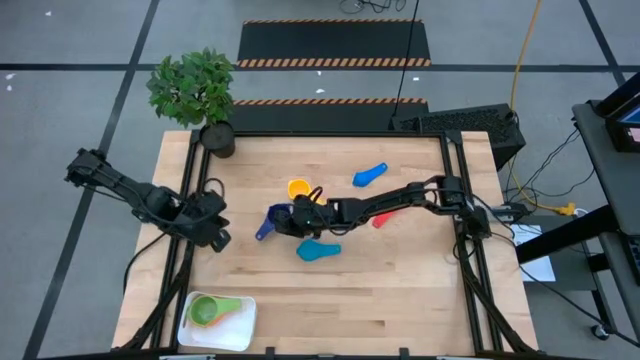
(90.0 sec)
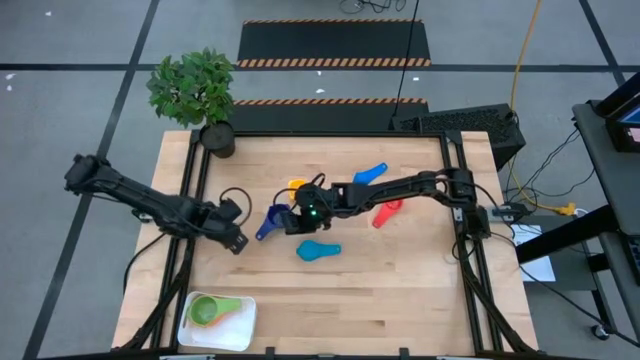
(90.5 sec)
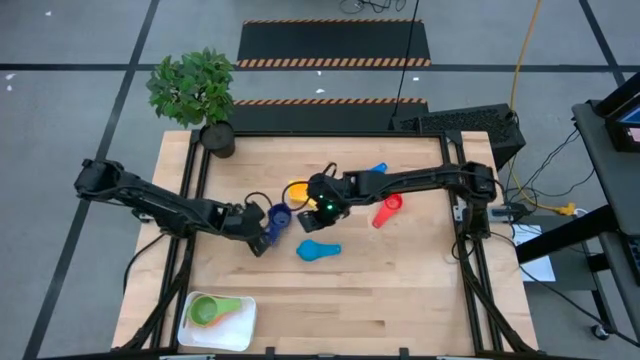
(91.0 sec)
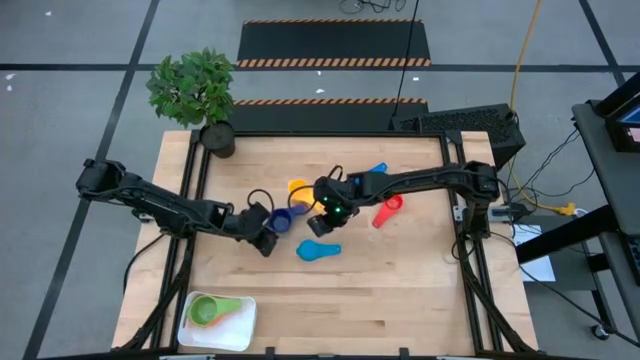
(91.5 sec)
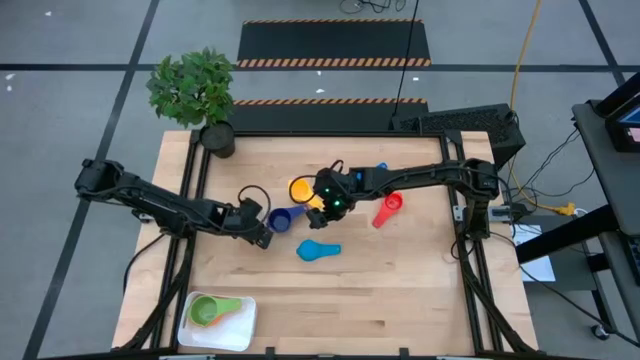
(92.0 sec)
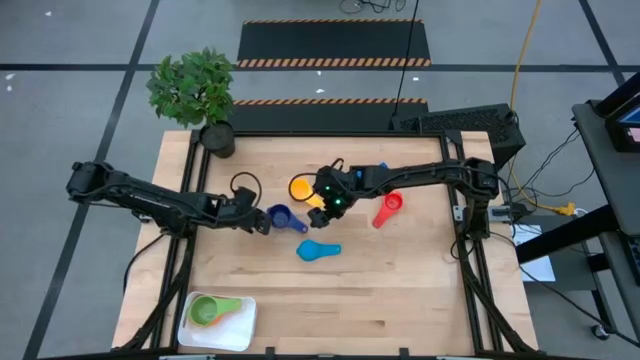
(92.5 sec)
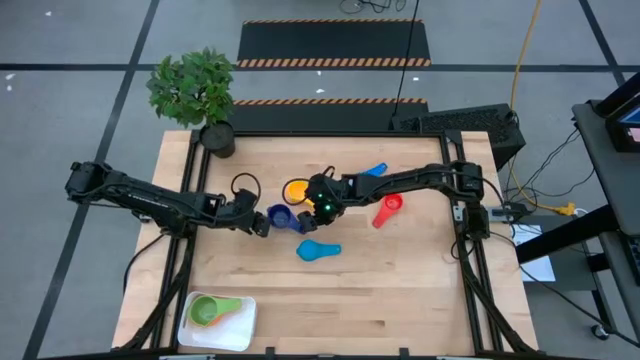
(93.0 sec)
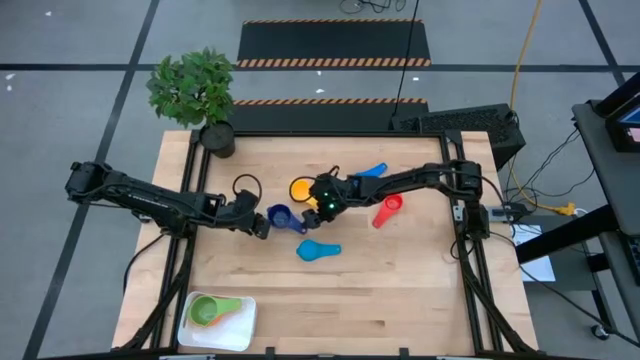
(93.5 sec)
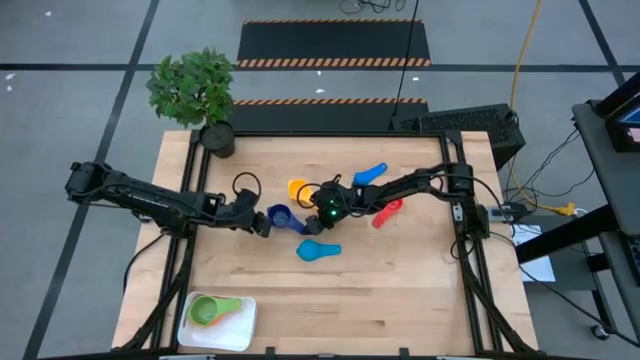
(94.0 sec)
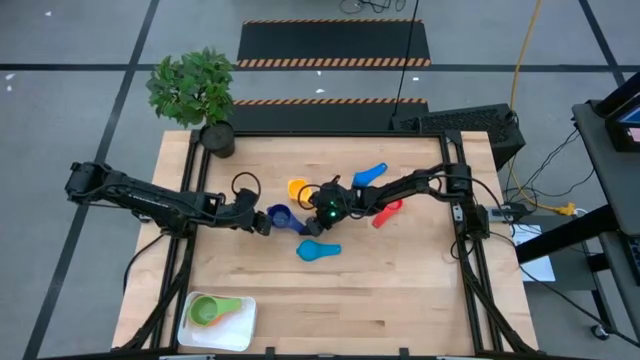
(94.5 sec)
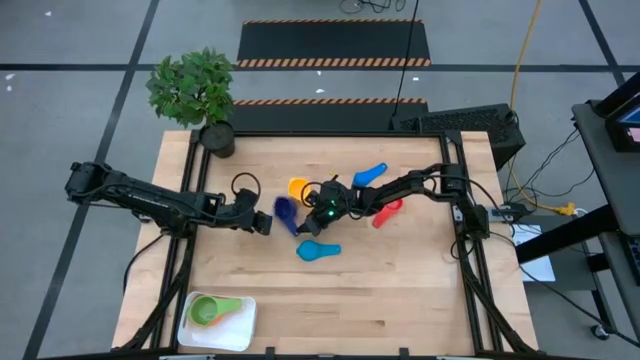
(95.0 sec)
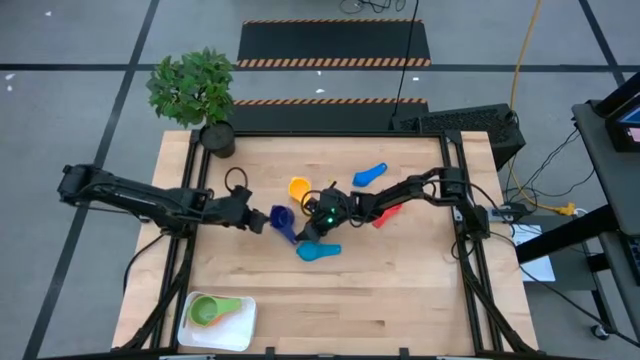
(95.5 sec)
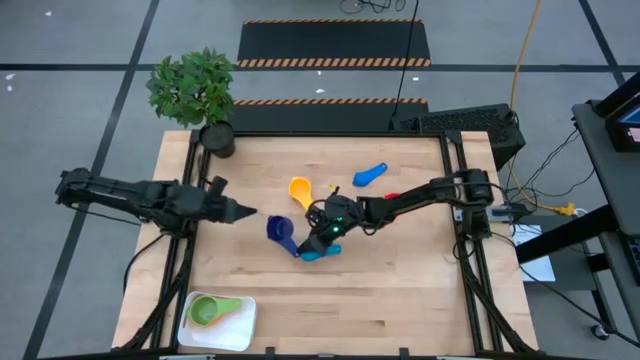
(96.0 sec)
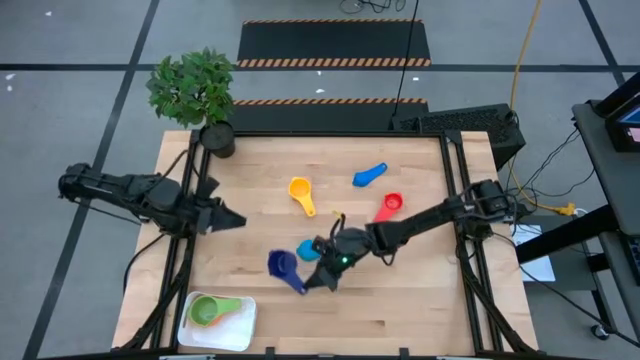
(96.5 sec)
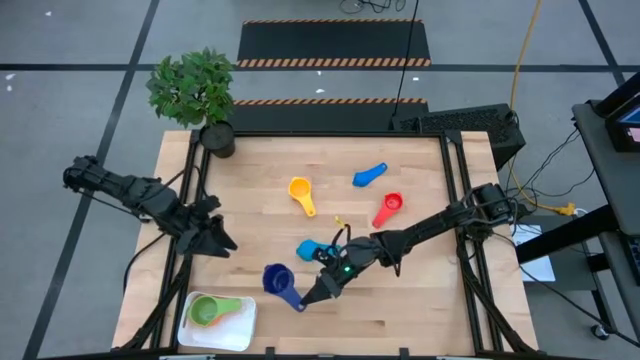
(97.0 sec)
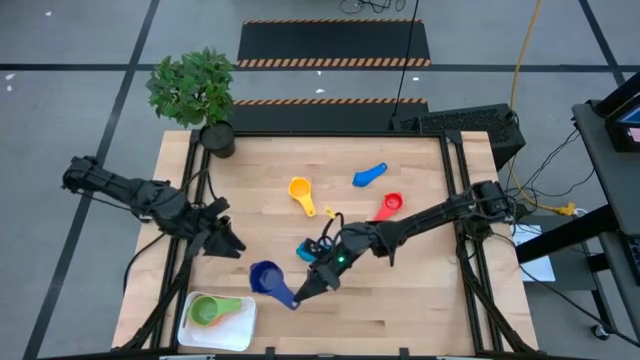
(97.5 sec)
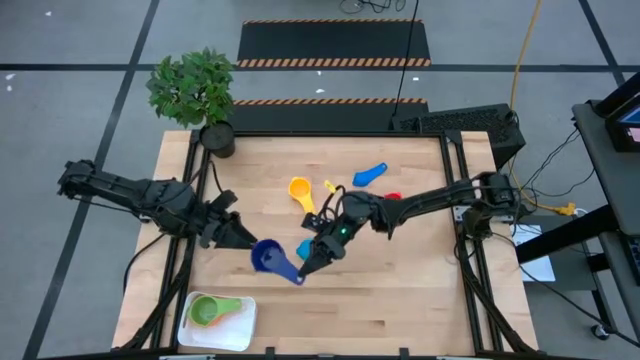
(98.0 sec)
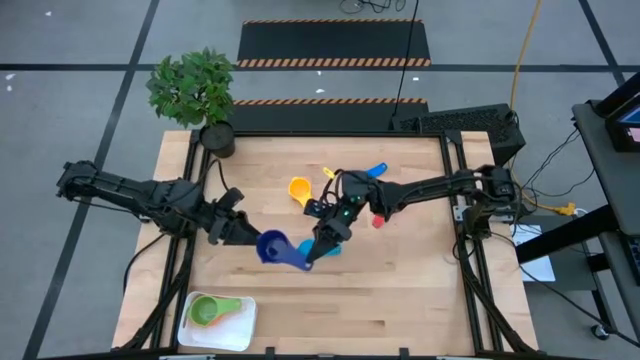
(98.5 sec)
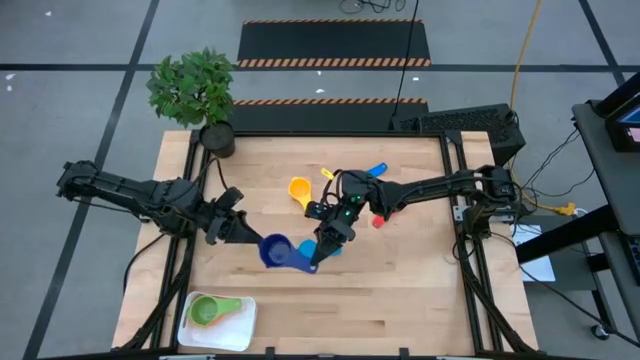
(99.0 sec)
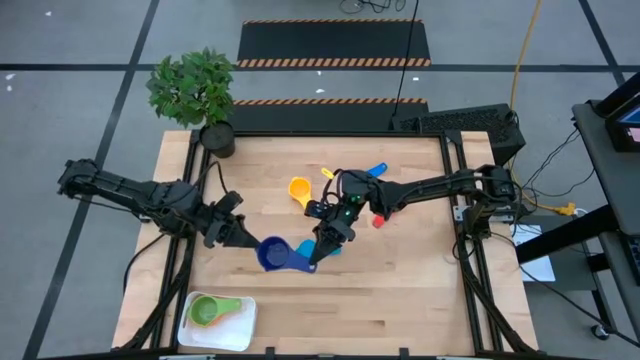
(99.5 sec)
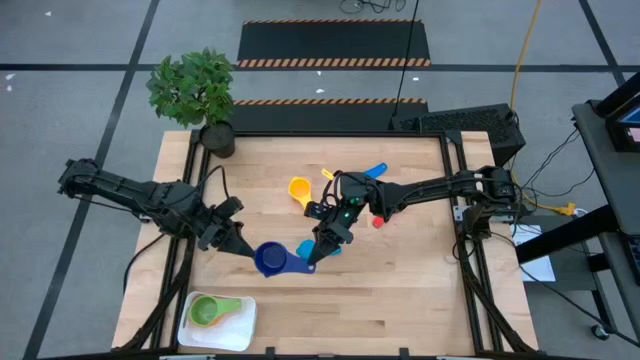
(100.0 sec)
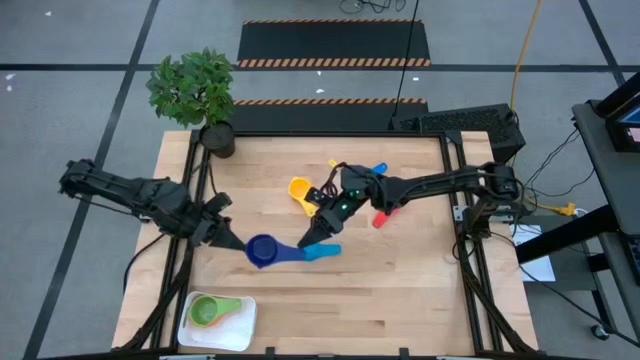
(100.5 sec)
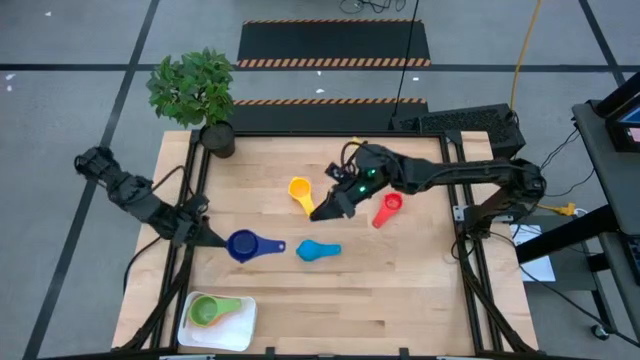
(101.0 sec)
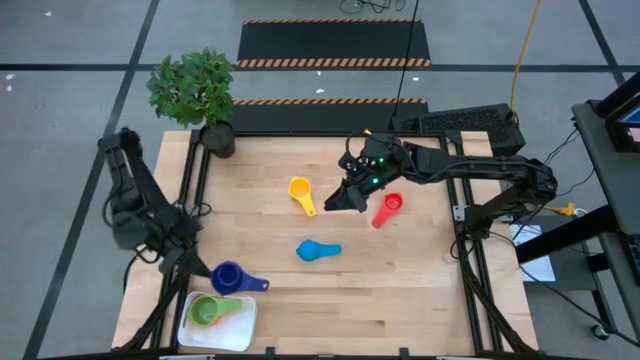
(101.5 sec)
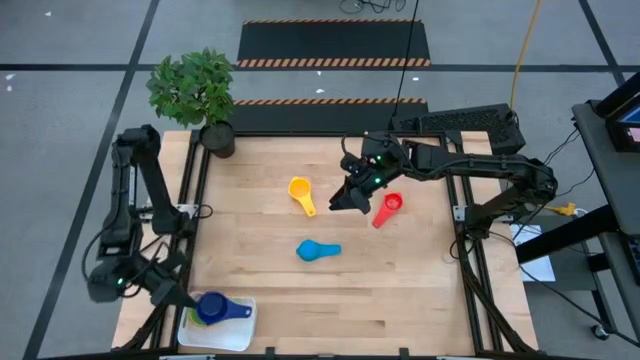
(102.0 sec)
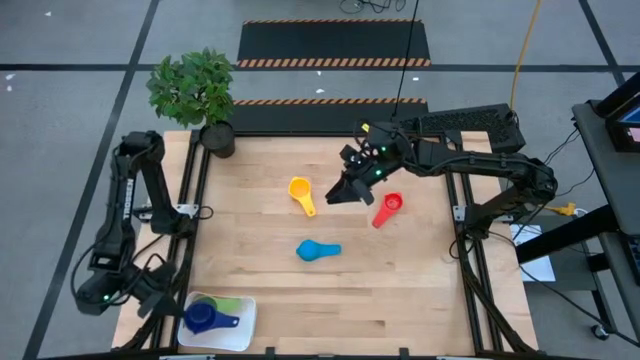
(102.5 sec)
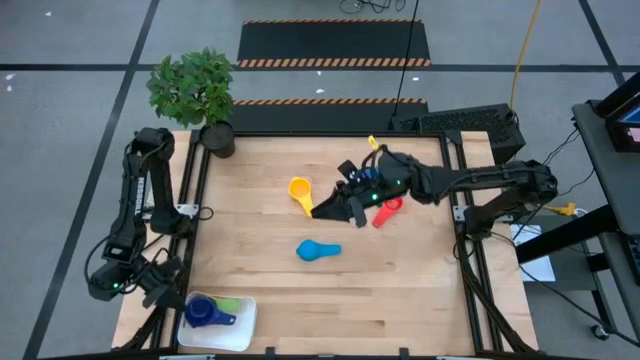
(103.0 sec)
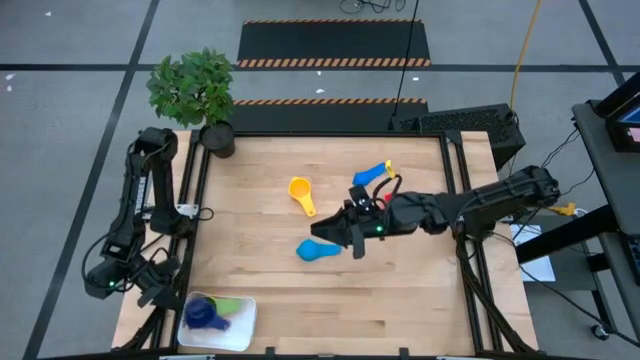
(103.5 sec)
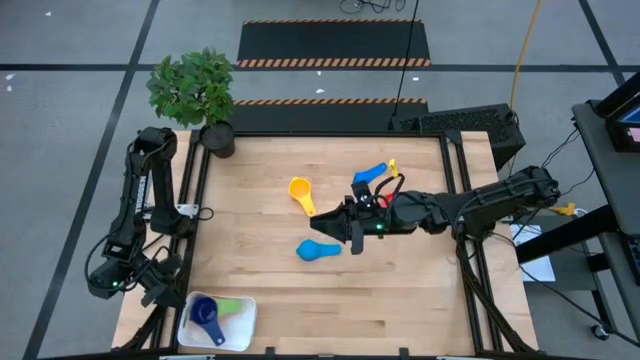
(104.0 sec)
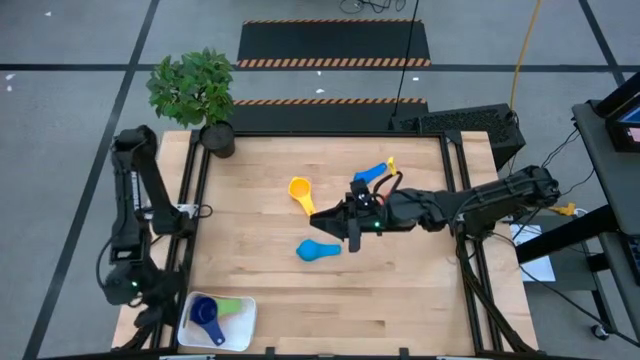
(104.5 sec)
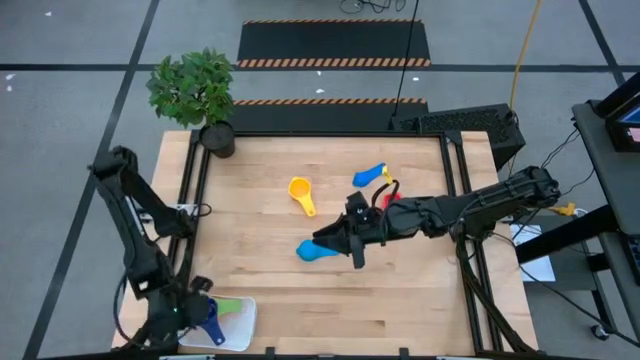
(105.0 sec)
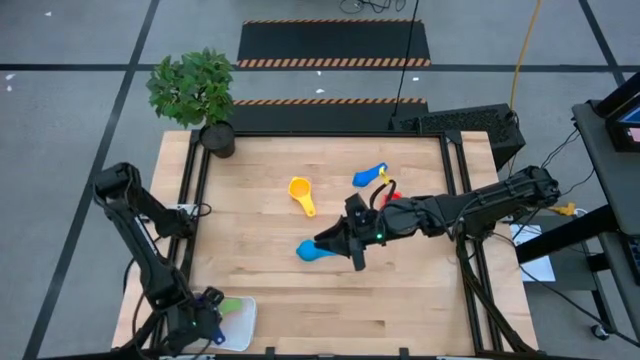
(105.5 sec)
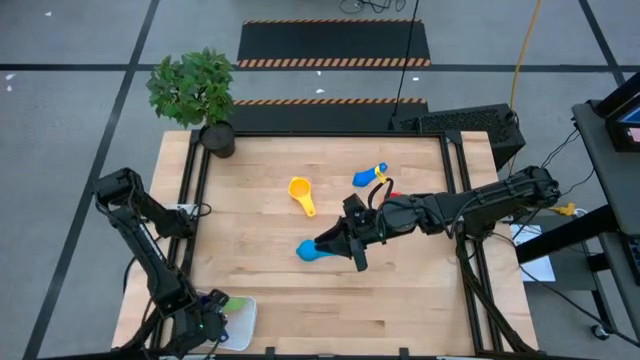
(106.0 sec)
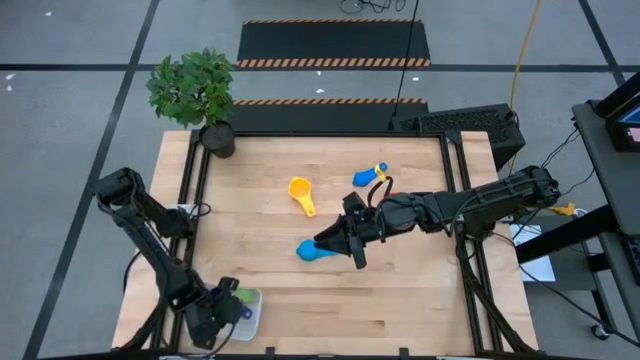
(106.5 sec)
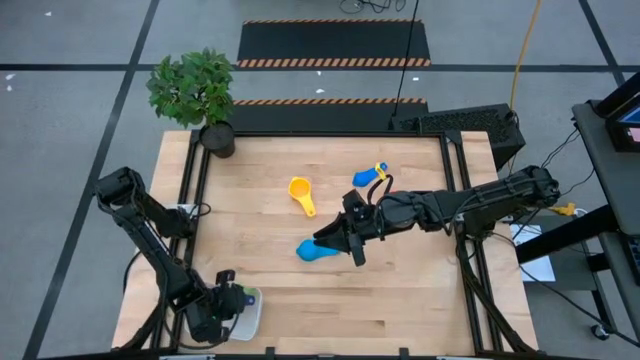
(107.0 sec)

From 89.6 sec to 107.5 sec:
Task: Nest measuring cups in basket
Stack the dark blue measuring cup on top of the green measuring cup in the white bin

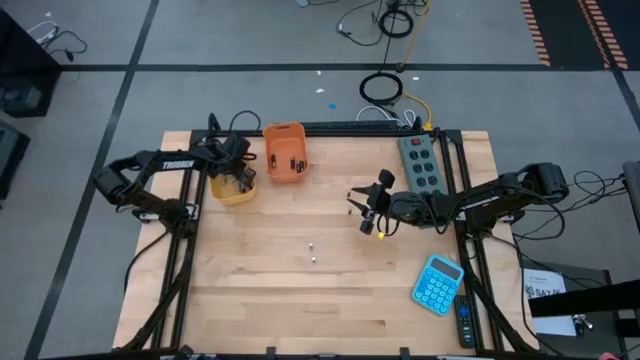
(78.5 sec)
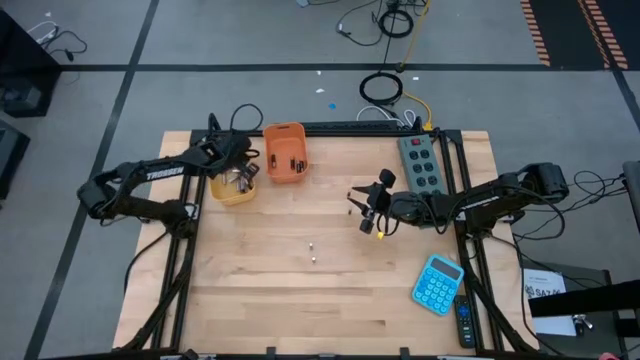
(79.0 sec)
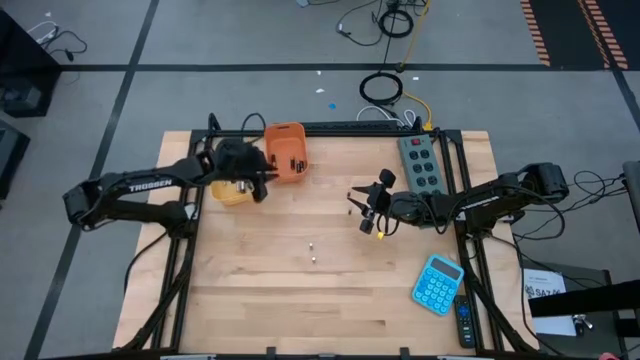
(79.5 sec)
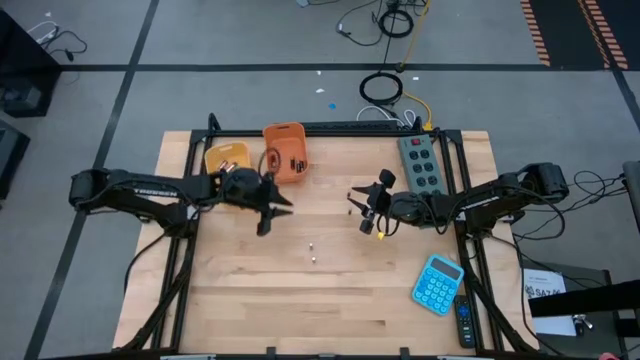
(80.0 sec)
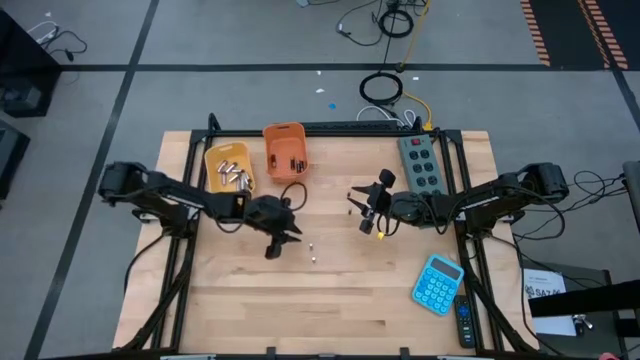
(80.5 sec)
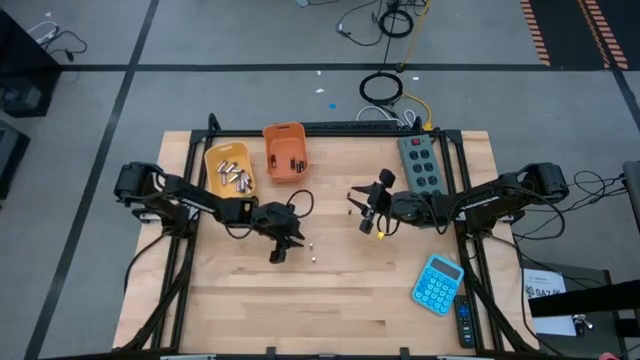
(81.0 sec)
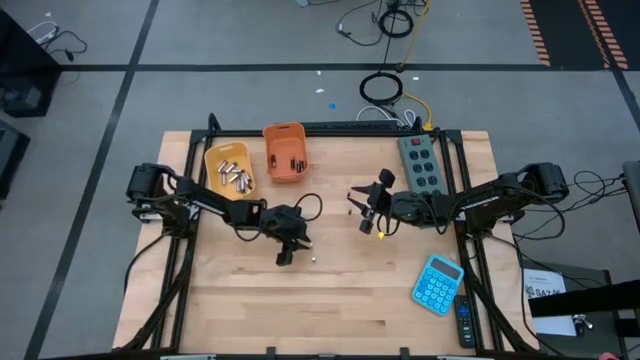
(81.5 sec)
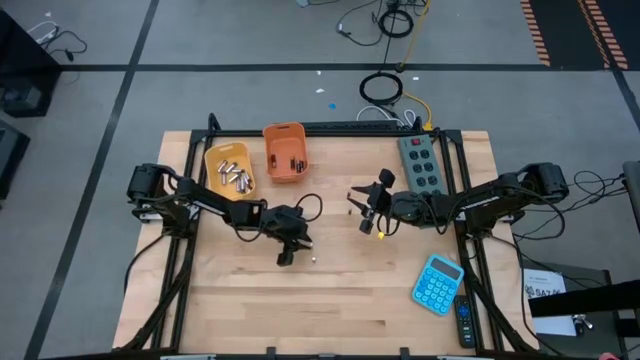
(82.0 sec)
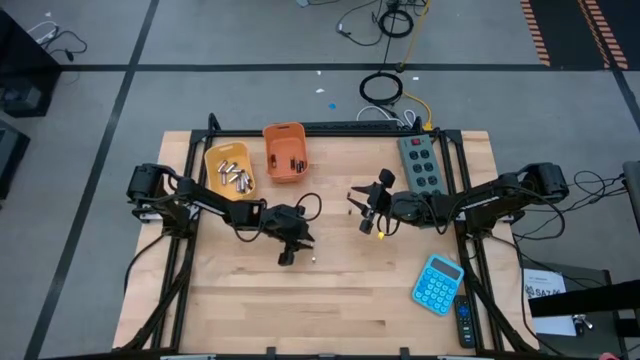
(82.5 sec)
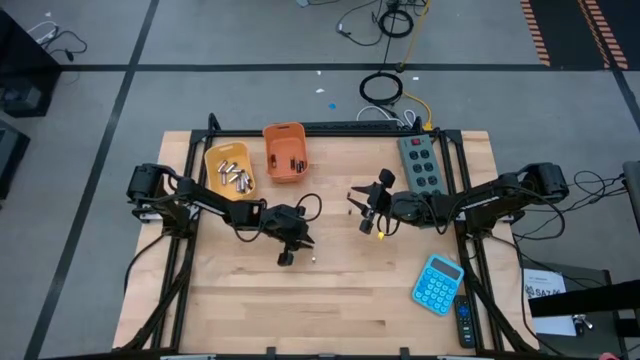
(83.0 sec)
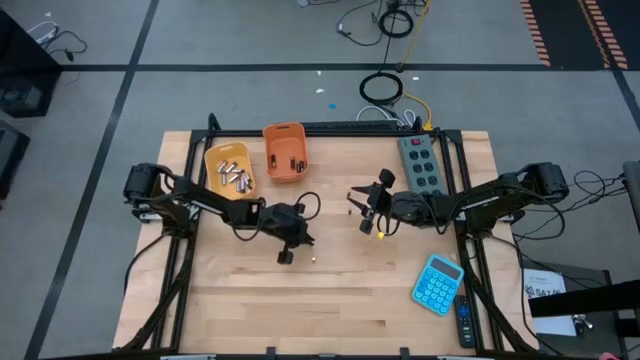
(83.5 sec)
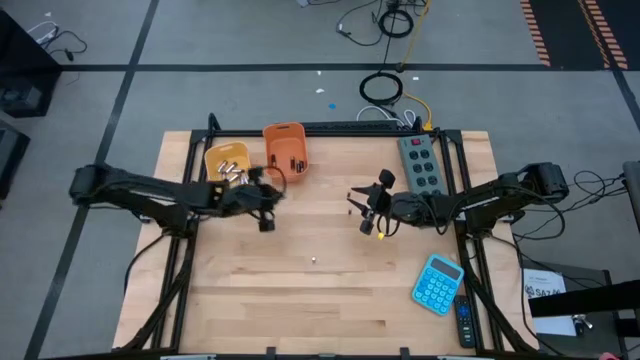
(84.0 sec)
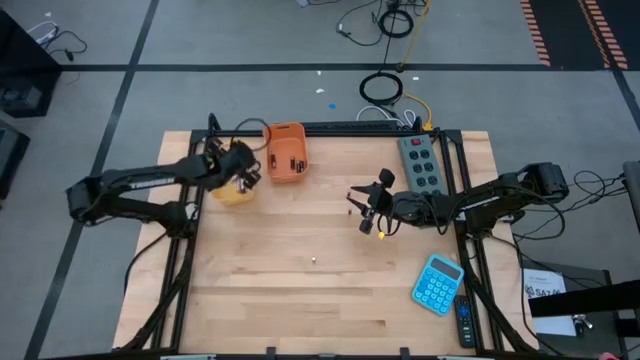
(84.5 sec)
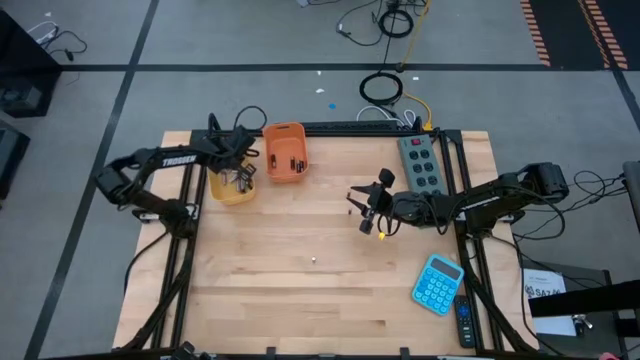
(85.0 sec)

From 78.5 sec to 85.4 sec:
Task: Sort batteries
Put the silver battery into the yellow bin
